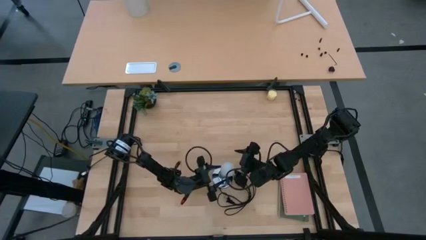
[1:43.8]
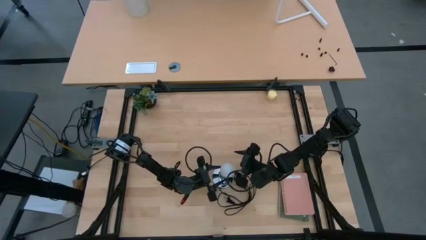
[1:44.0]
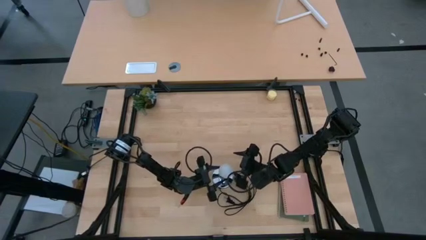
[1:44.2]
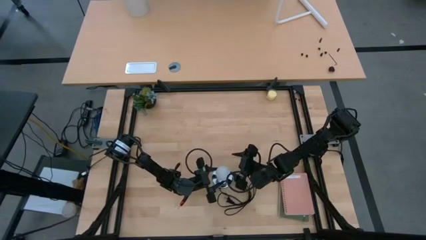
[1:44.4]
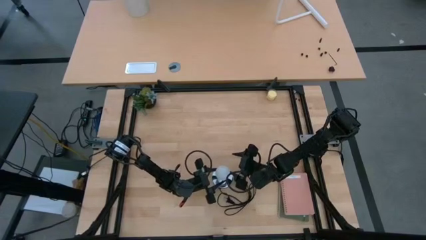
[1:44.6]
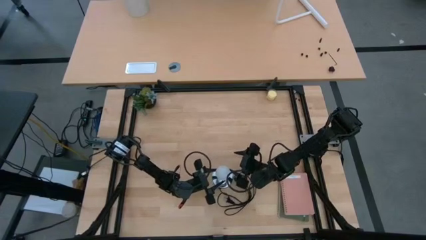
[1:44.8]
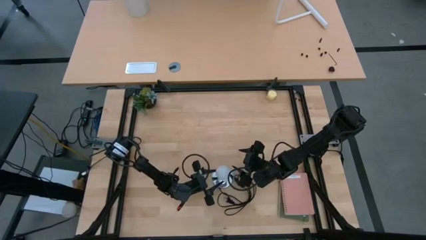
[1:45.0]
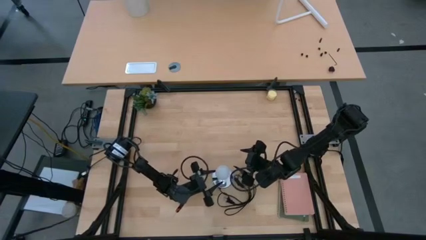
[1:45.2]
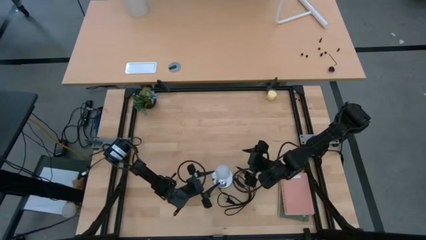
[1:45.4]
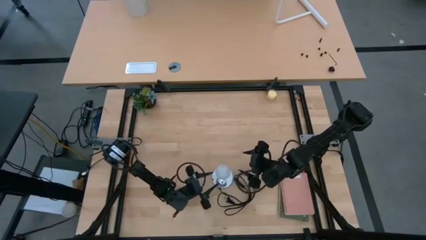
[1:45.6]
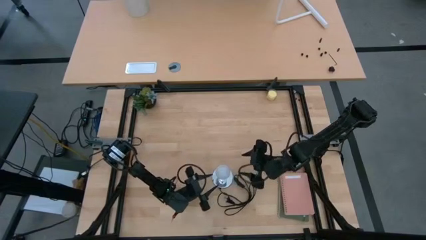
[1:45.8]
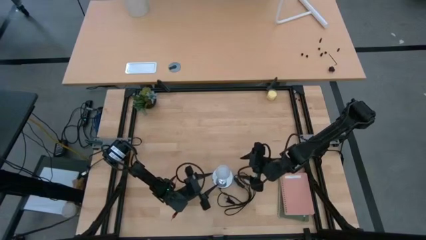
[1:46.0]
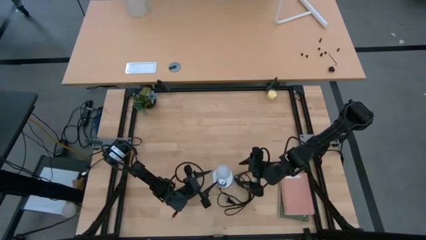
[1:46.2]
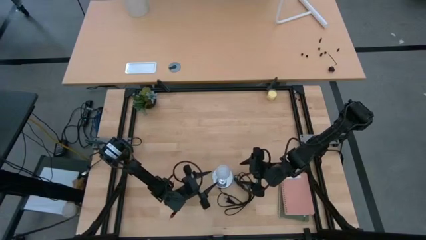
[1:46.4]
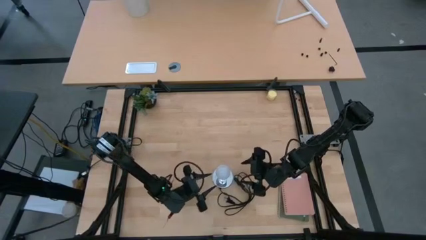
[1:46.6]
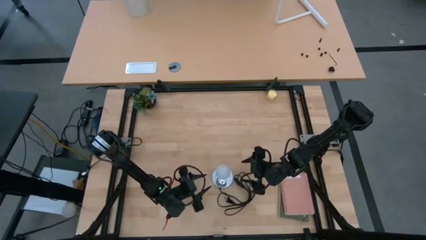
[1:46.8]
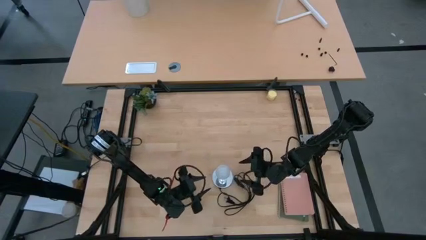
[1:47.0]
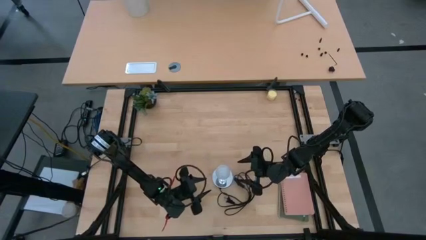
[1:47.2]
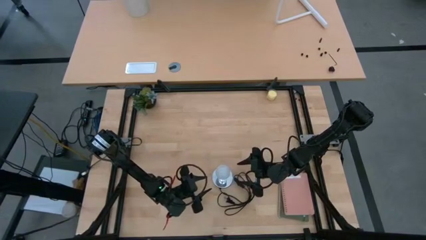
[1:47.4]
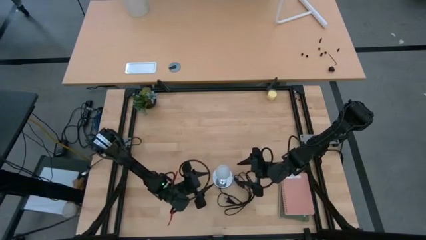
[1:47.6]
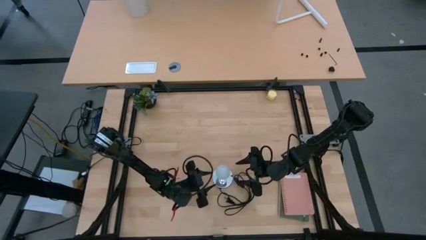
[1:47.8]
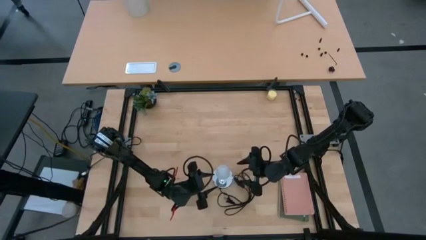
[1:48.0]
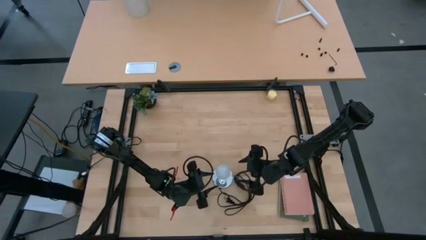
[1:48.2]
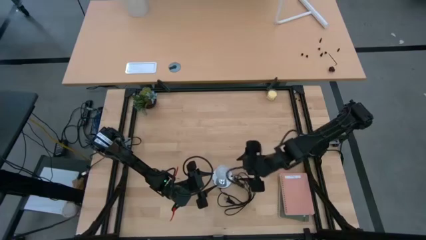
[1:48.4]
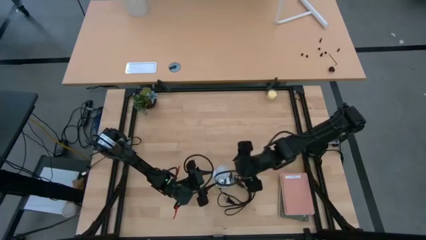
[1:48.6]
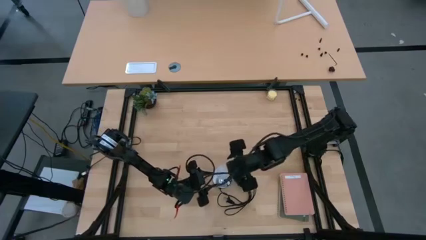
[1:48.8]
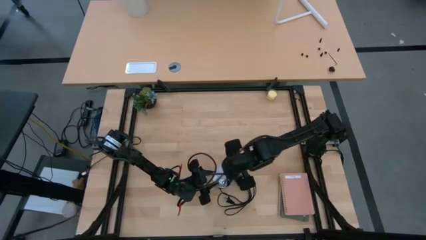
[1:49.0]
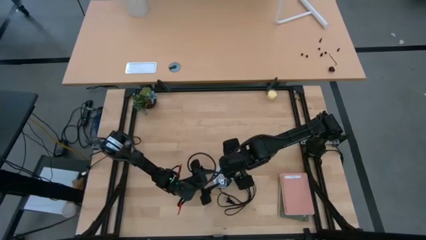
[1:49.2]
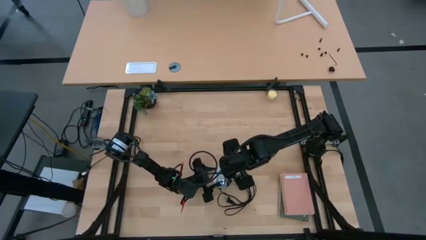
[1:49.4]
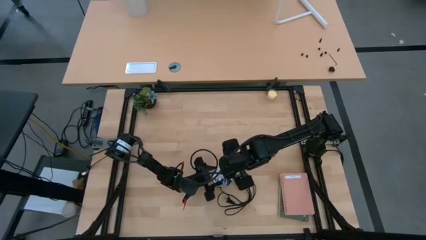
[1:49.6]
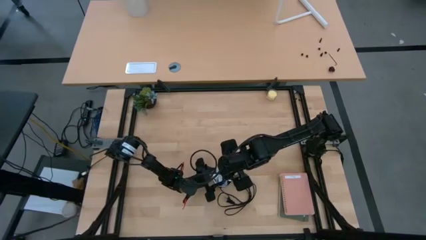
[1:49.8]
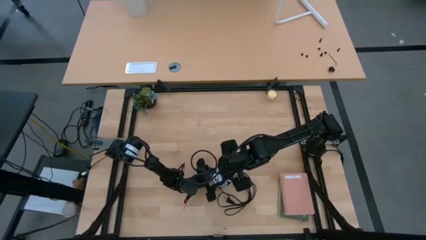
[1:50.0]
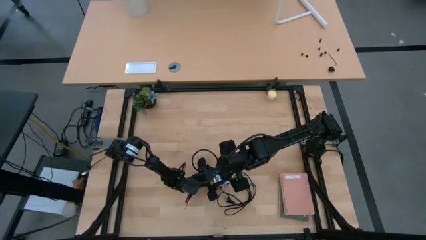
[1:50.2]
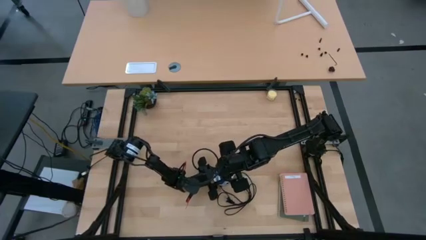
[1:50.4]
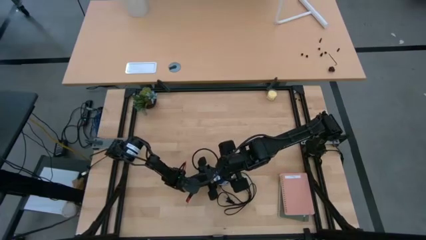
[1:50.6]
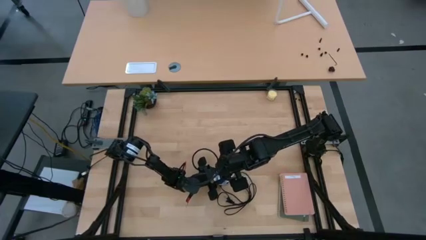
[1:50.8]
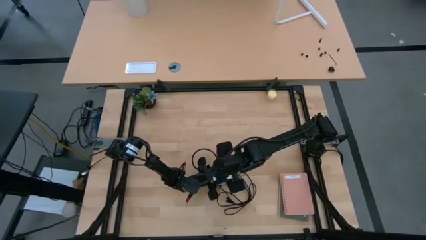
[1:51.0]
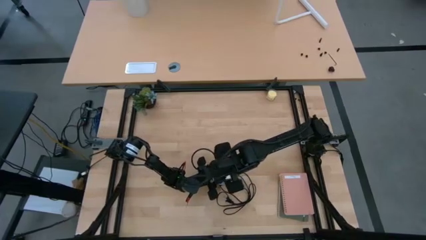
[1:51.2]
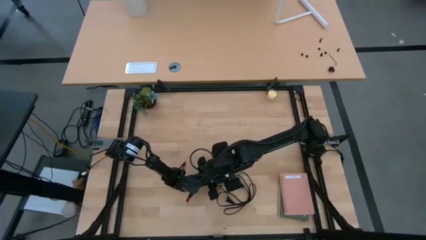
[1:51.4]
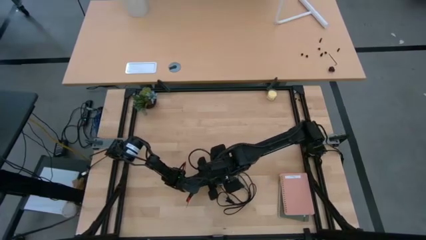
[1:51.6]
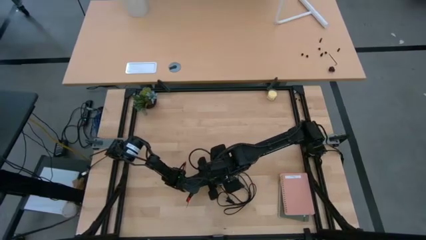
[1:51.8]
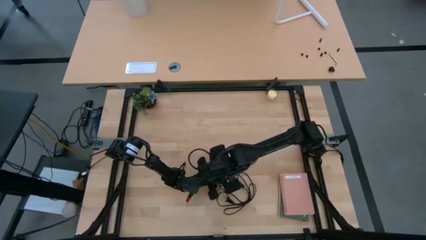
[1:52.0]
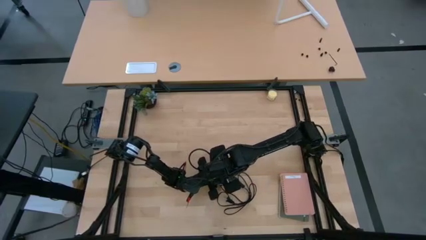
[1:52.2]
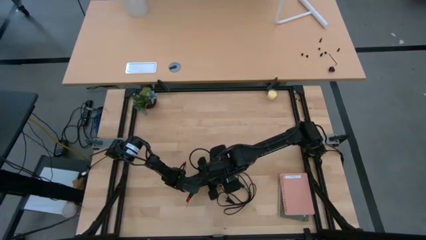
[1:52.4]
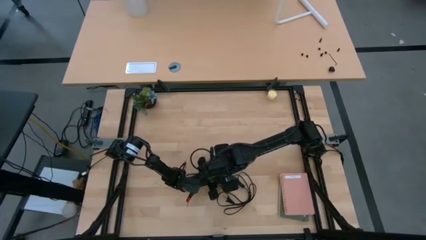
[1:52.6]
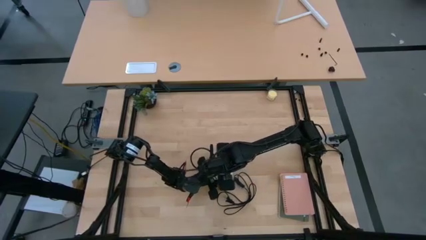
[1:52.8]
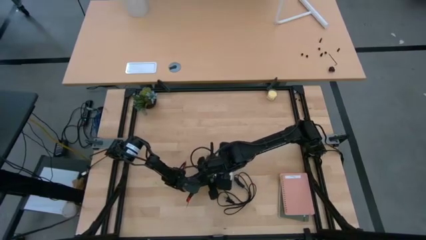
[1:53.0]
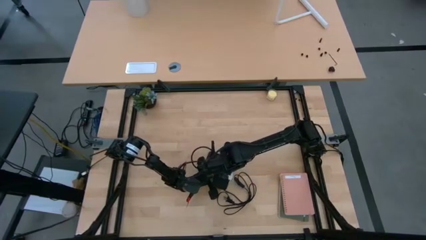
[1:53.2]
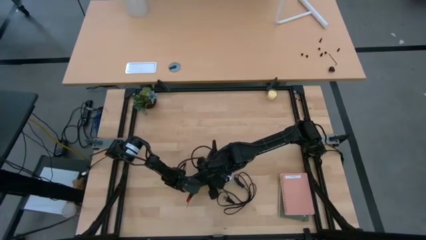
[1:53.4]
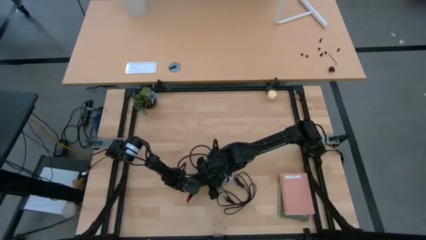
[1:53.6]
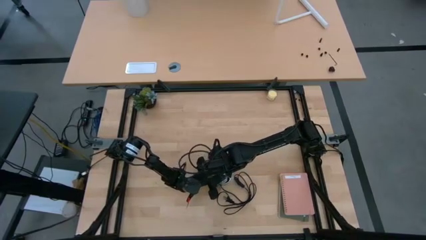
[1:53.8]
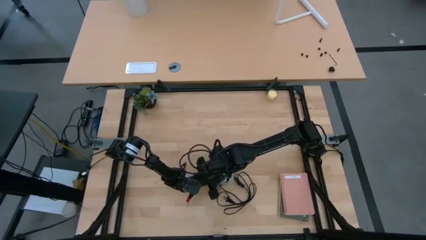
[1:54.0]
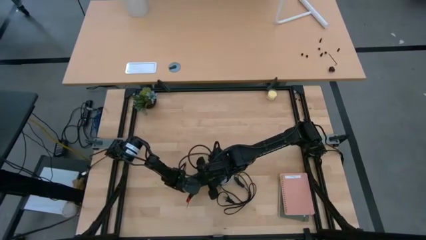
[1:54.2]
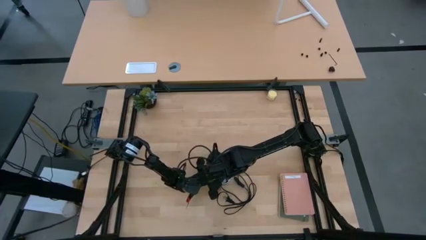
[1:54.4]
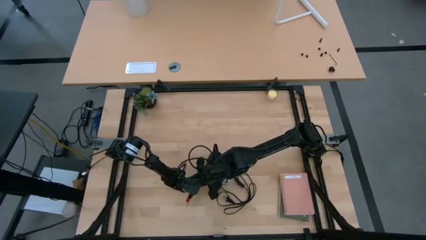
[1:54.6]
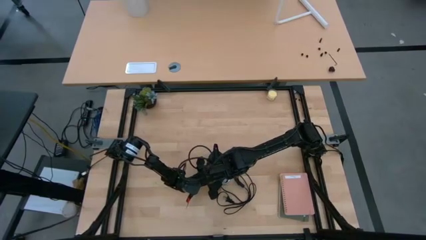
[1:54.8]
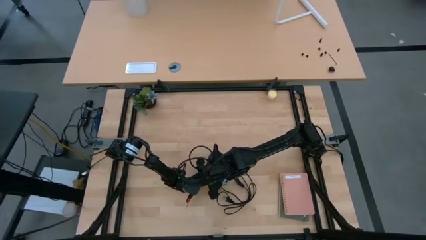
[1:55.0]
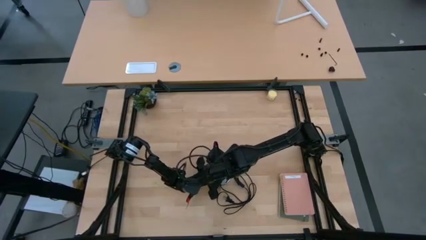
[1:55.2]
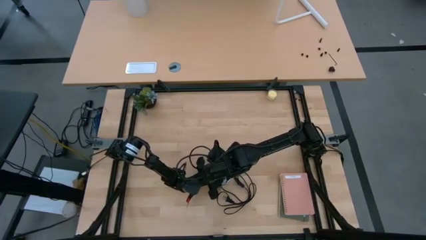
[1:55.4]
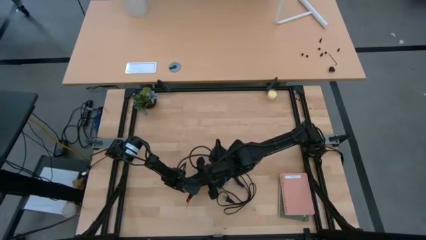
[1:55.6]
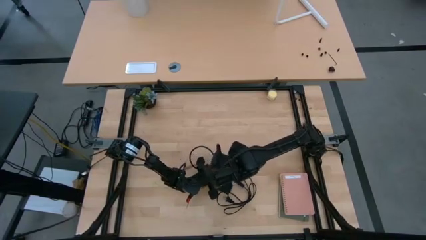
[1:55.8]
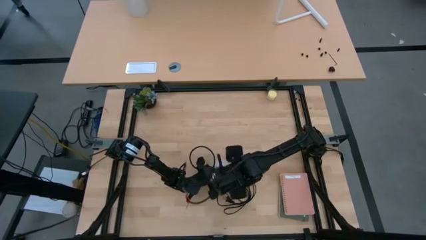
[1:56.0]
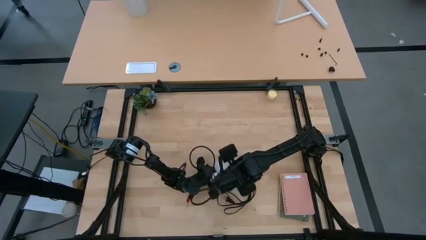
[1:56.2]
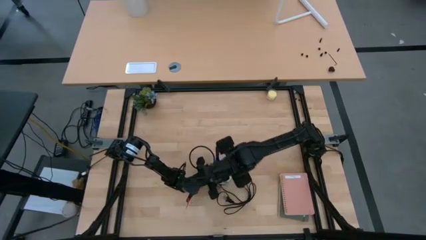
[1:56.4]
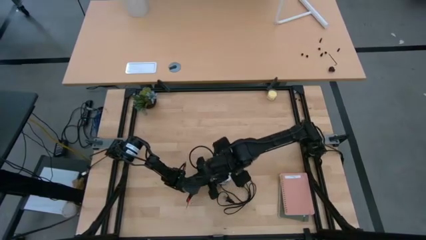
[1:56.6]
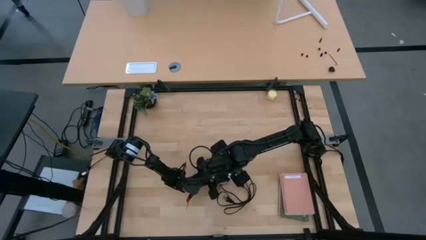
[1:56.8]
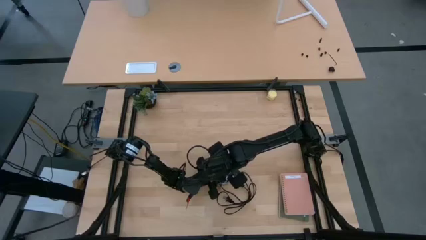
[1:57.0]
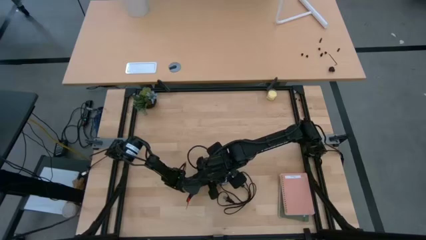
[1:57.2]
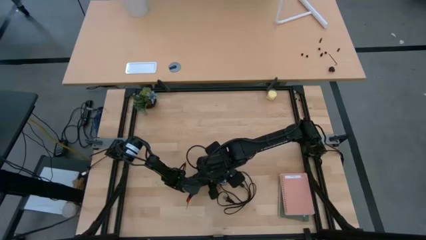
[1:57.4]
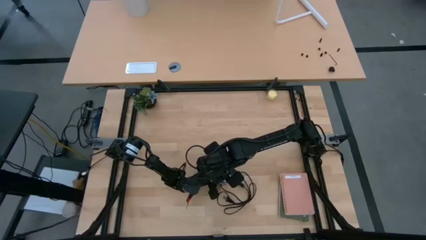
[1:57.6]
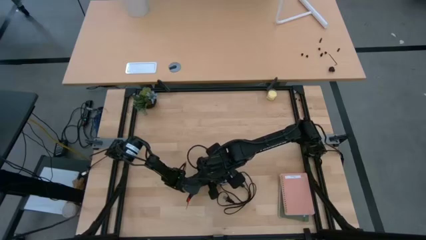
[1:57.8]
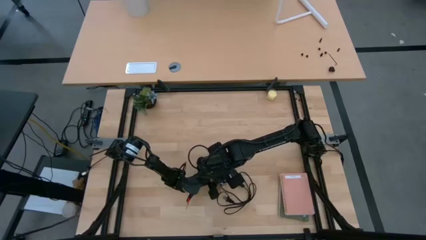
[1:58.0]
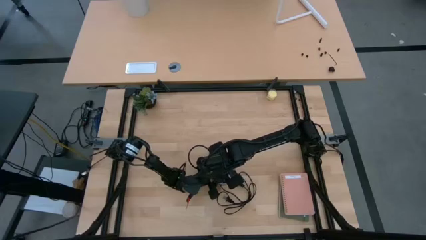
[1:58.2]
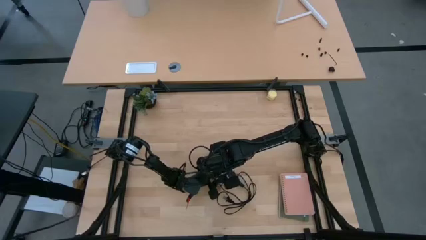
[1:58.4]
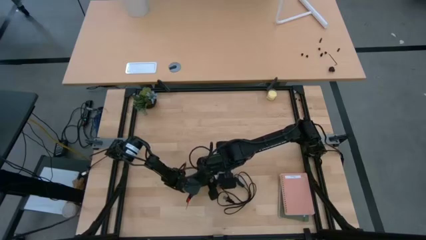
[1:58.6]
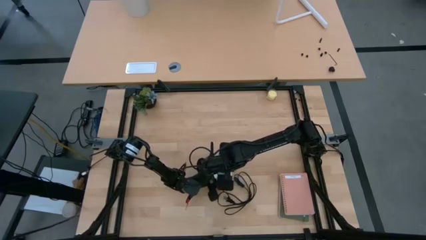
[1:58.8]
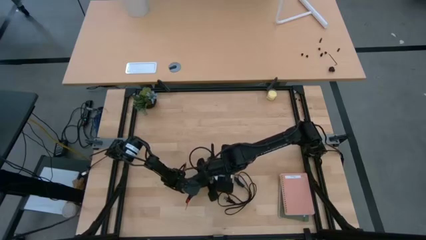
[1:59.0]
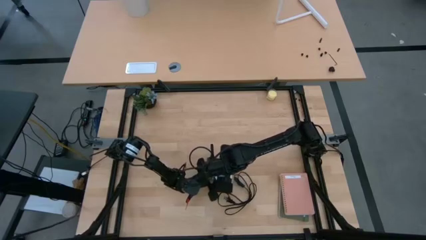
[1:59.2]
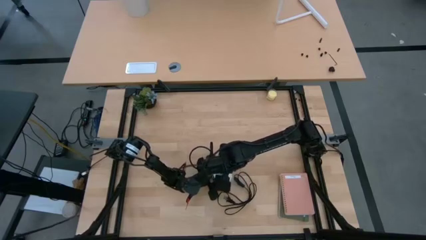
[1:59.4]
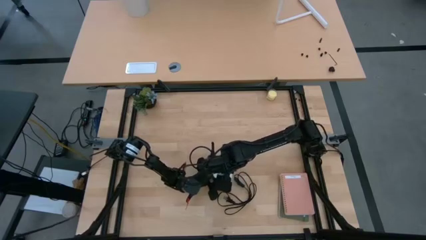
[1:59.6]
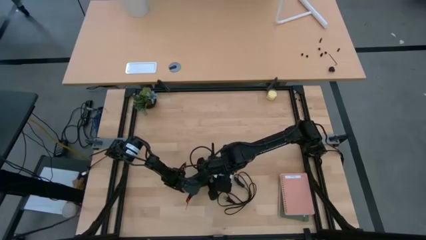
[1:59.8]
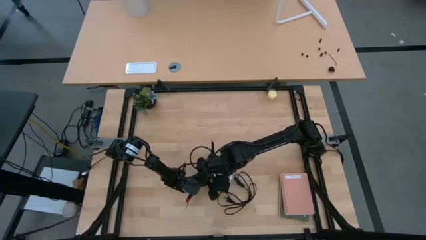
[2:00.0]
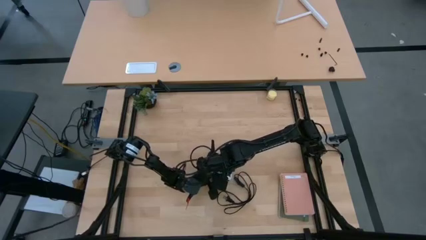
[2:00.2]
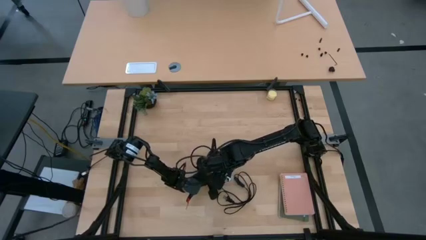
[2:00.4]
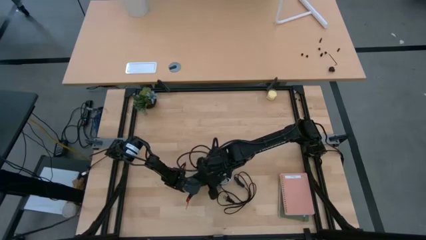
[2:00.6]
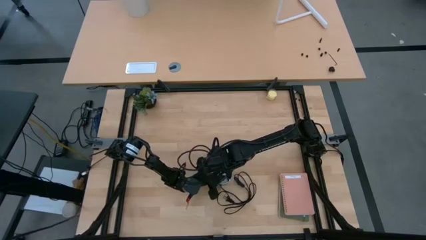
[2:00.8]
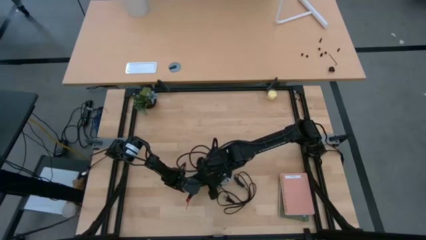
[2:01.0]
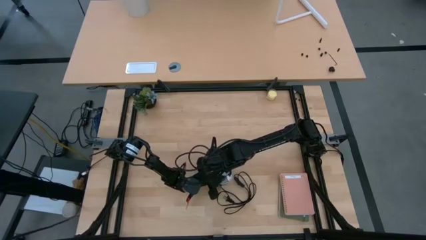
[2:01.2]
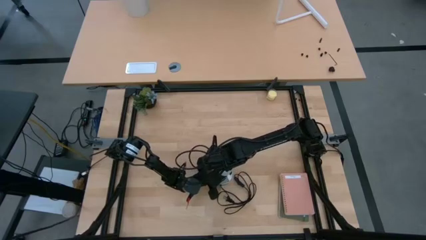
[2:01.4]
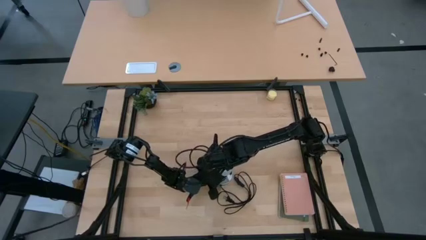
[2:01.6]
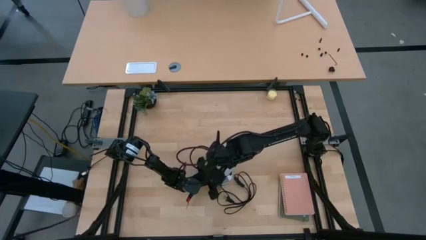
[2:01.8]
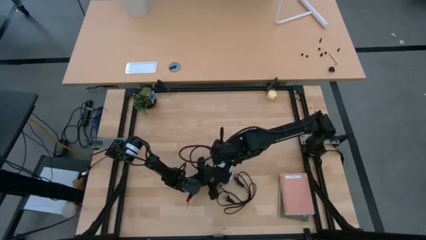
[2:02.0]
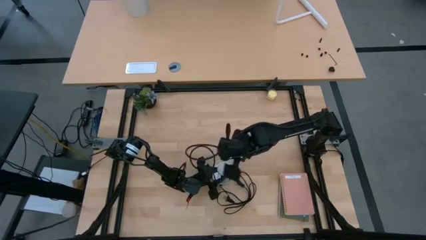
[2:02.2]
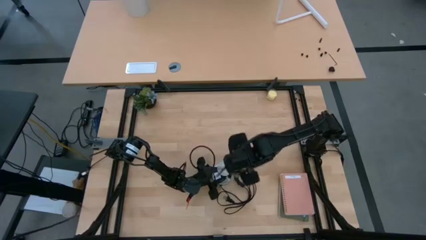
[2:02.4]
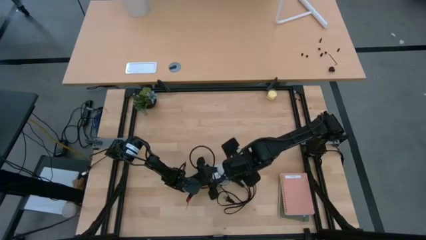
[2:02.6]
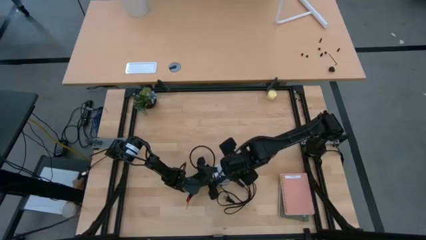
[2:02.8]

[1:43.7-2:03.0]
Task: Screw lightbulb
Insert the lightbulb into the lamp
